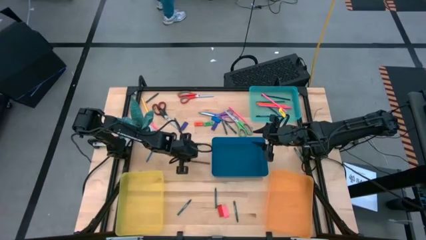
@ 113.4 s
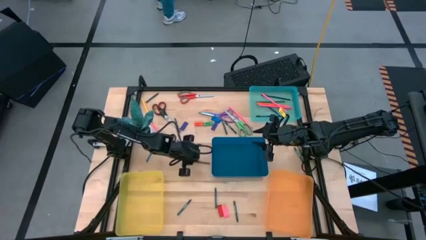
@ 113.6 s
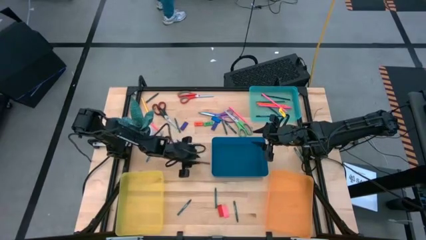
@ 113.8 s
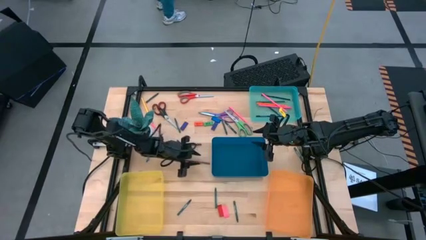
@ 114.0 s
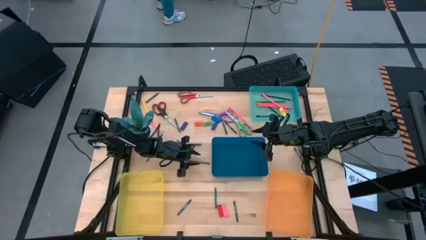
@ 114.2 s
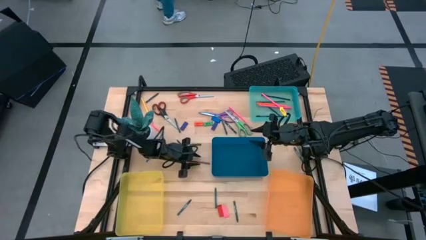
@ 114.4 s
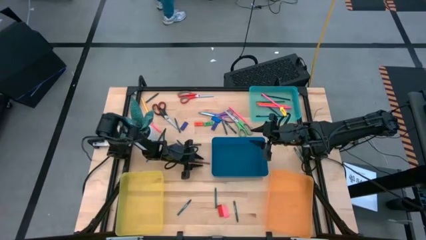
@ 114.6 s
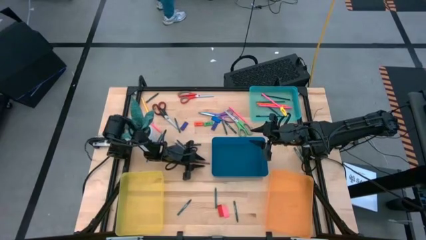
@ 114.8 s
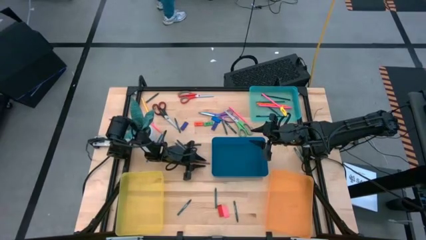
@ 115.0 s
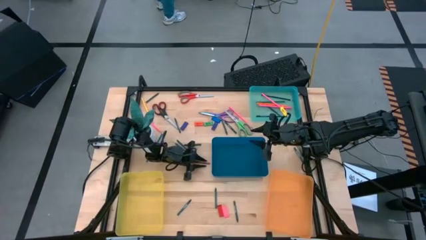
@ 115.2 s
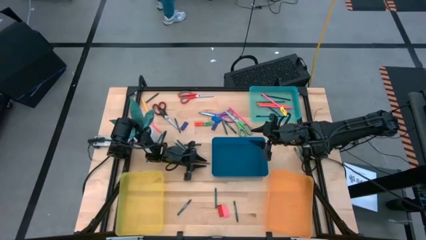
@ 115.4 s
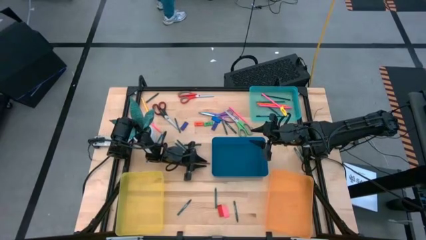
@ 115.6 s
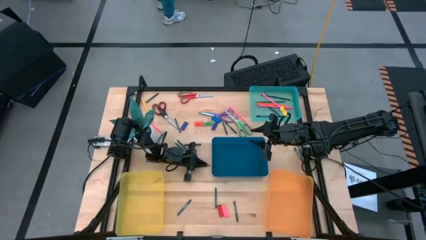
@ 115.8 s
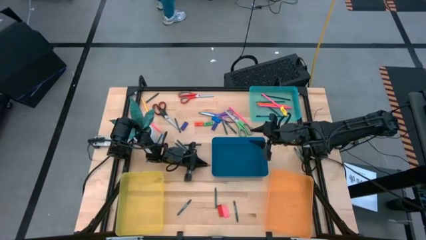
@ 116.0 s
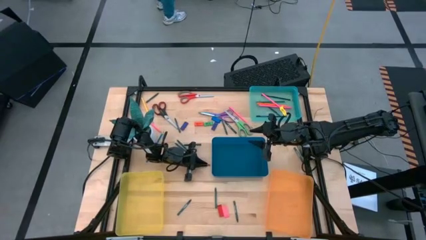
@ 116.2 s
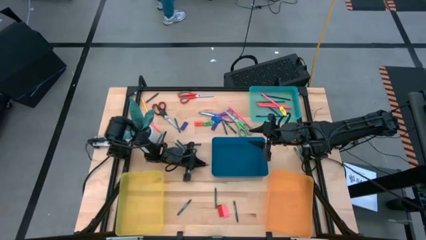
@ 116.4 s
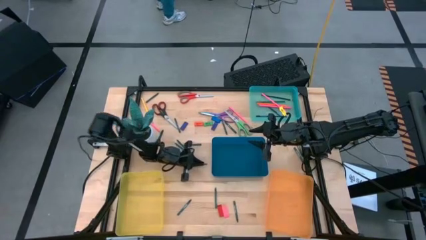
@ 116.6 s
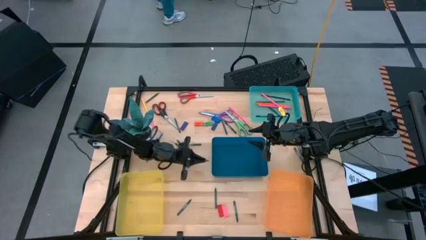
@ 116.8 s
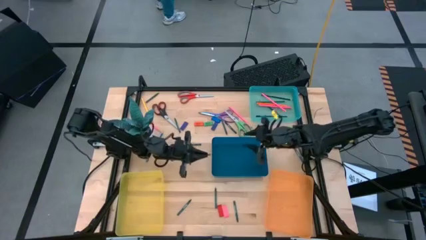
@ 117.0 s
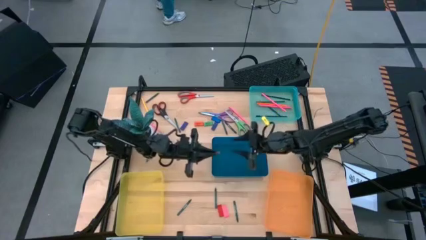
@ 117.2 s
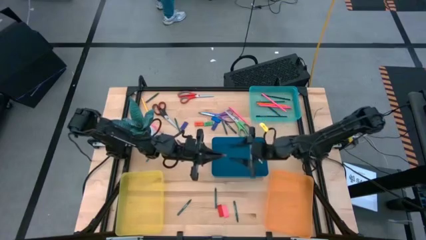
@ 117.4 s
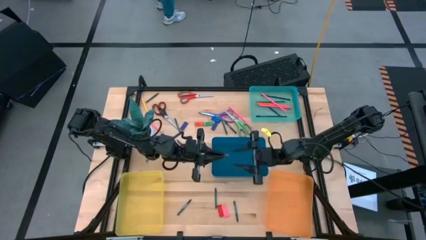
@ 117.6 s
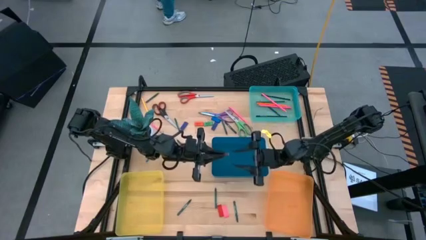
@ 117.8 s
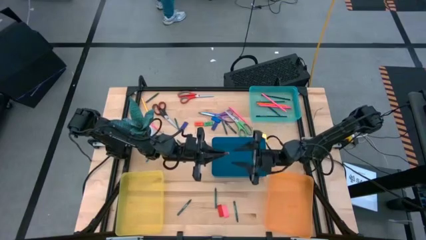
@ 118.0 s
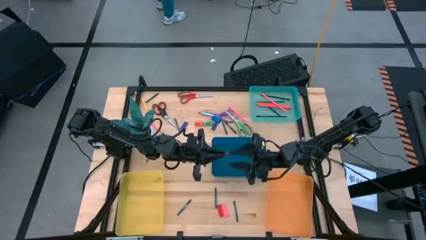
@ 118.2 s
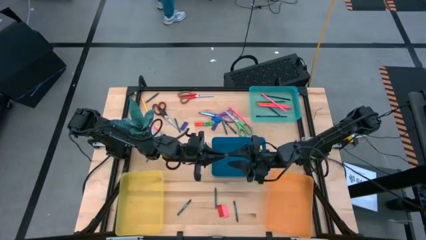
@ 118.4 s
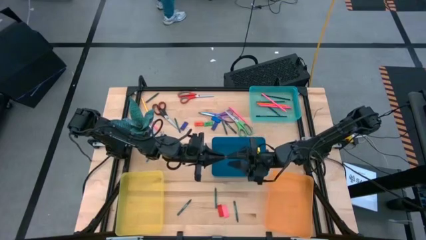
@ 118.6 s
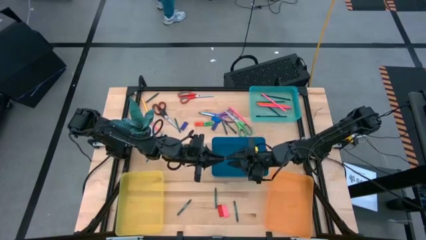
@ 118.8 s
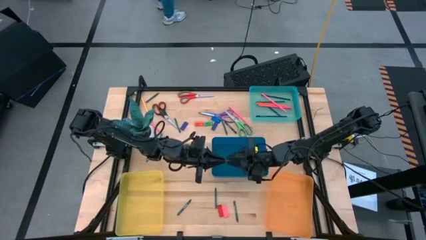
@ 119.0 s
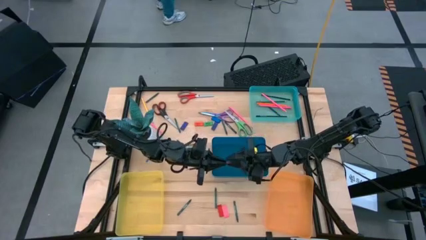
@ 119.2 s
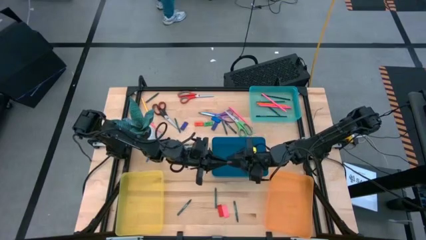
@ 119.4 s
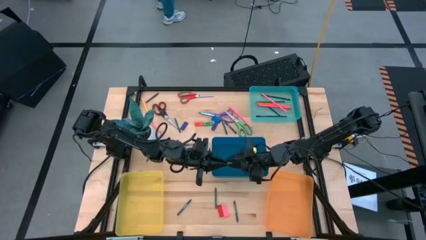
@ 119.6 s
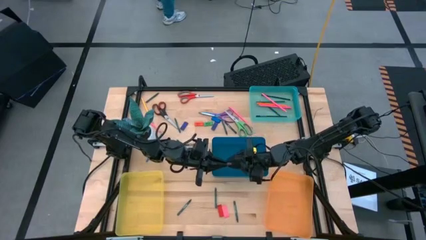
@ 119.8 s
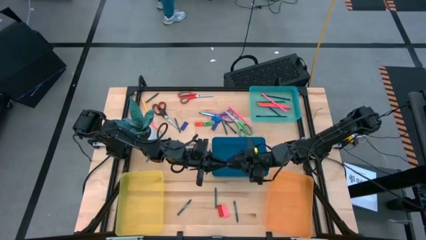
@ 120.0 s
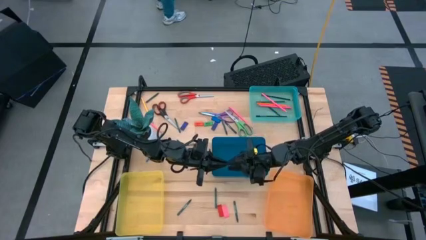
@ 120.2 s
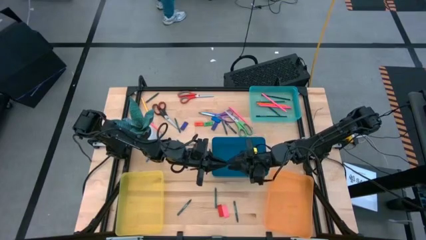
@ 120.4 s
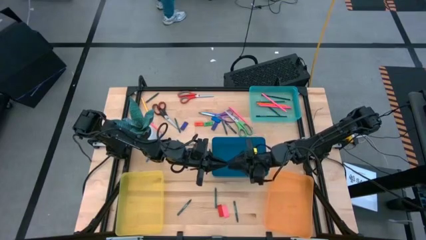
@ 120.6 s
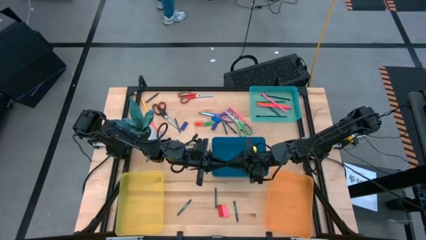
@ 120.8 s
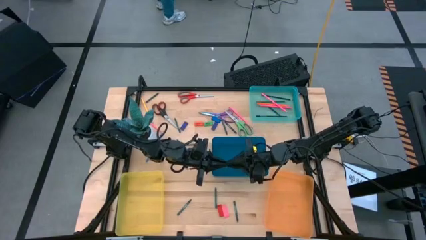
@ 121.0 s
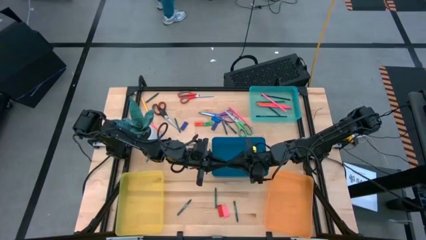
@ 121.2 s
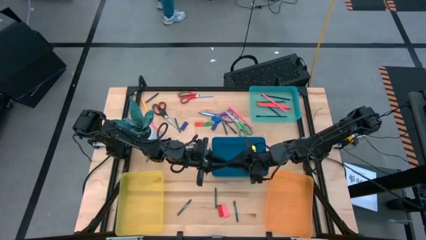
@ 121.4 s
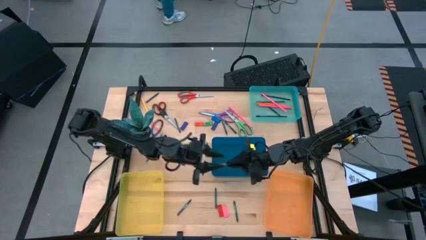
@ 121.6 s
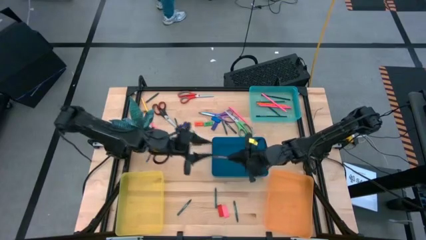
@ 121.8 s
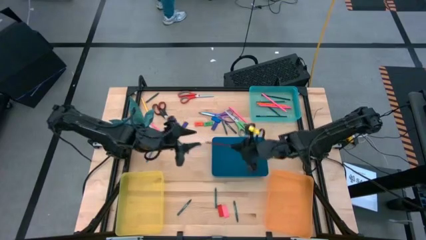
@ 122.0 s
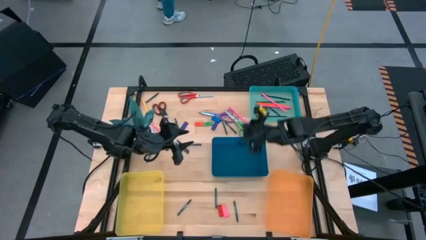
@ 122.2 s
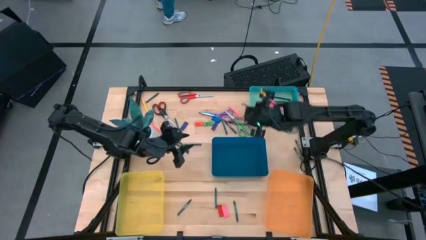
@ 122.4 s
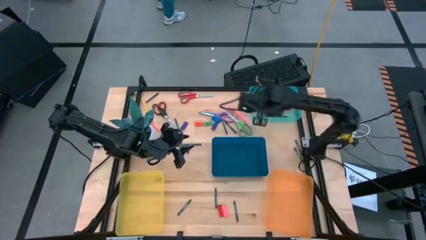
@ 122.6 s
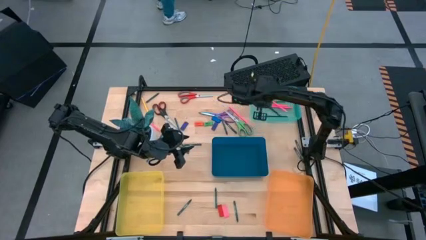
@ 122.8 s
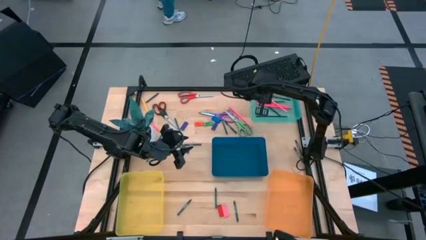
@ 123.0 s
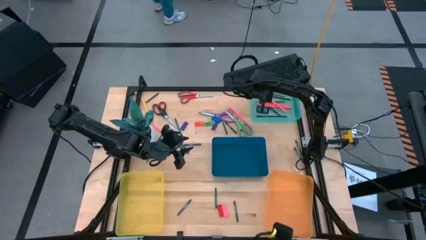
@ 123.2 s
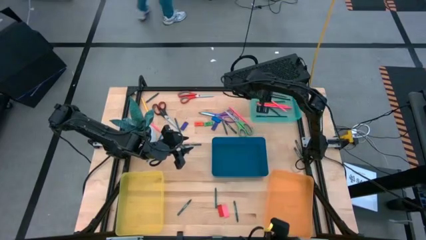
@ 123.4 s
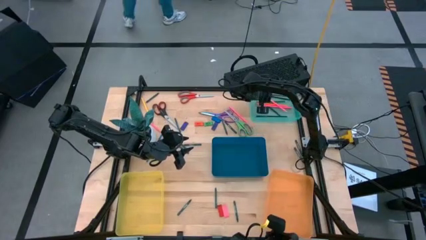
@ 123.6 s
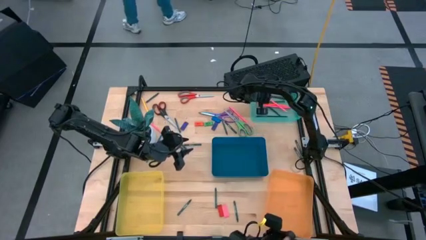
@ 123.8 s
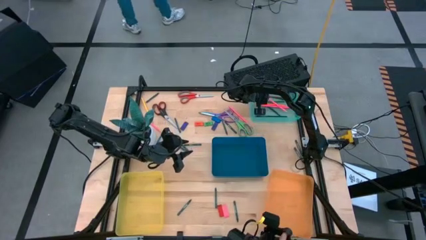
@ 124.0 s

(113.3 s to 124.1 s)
Task: Sort crayons/erasers/pens/pencils in bins
Put the brown pencil into the green bin

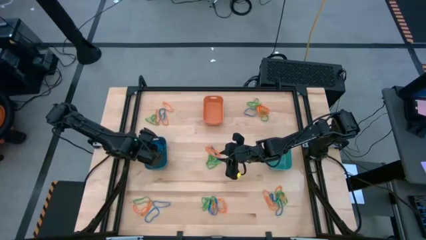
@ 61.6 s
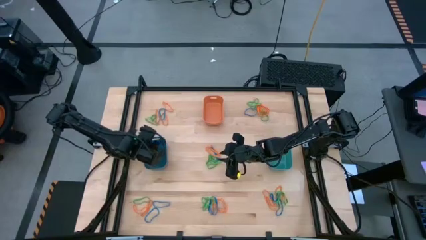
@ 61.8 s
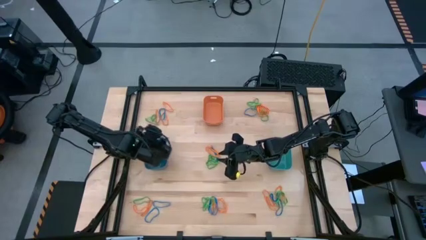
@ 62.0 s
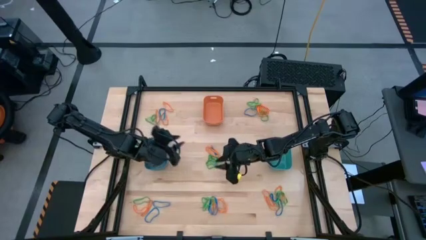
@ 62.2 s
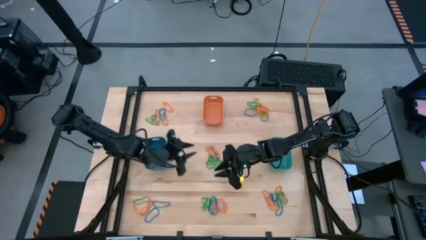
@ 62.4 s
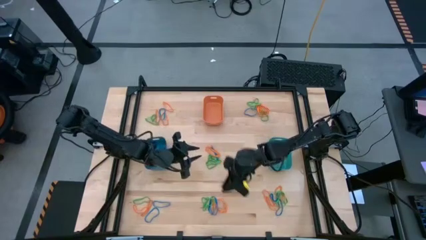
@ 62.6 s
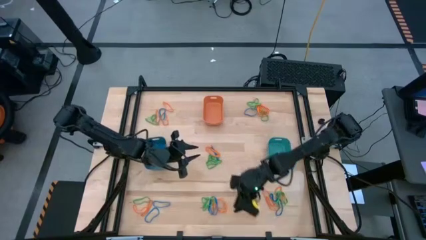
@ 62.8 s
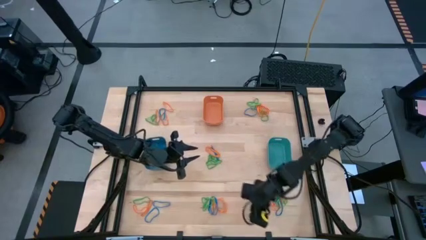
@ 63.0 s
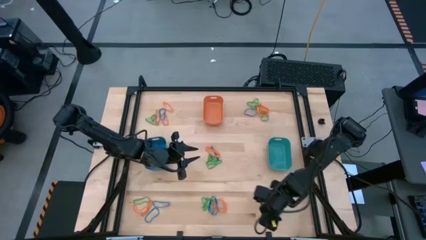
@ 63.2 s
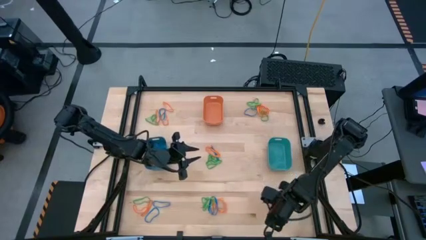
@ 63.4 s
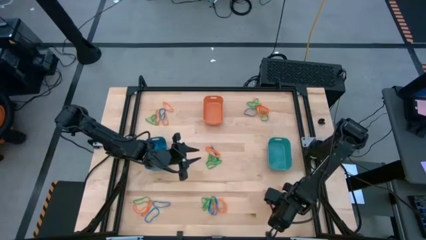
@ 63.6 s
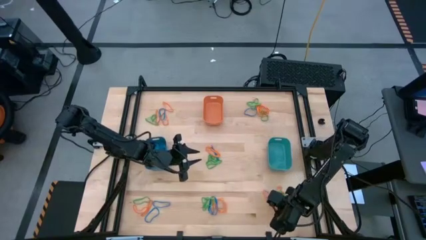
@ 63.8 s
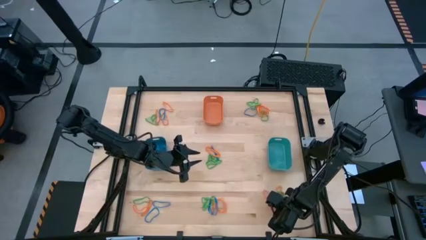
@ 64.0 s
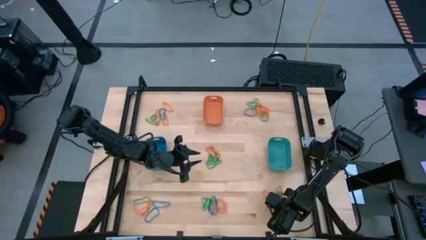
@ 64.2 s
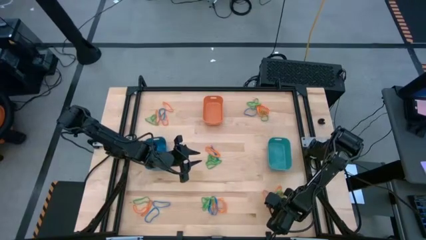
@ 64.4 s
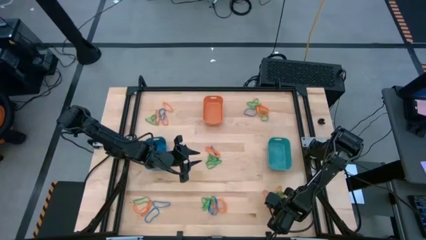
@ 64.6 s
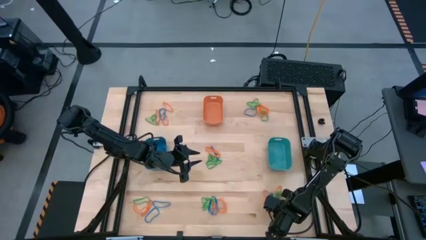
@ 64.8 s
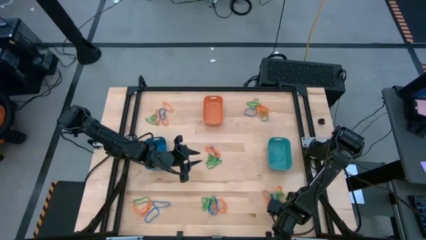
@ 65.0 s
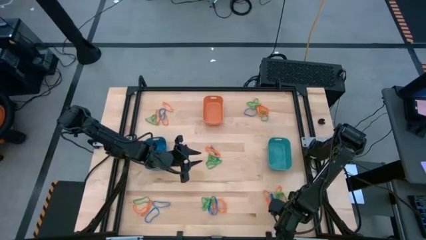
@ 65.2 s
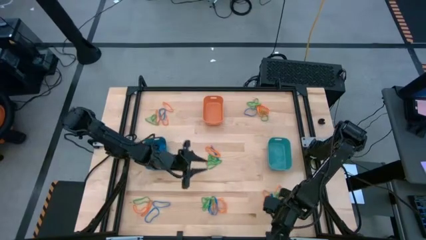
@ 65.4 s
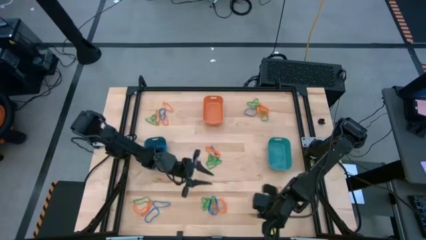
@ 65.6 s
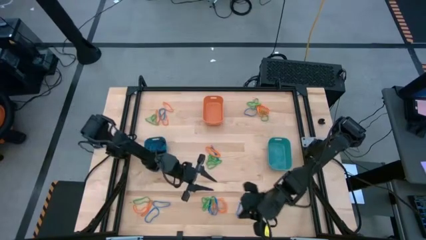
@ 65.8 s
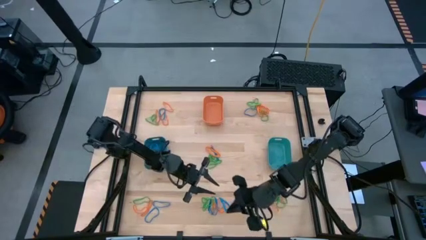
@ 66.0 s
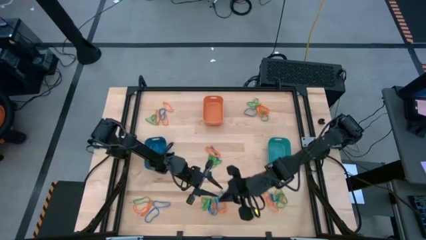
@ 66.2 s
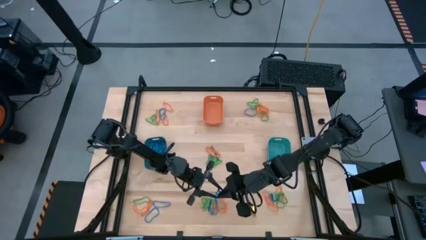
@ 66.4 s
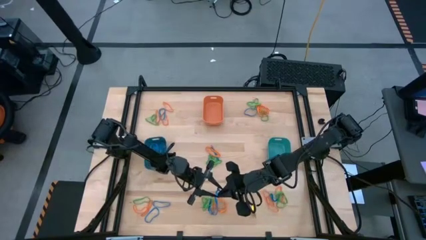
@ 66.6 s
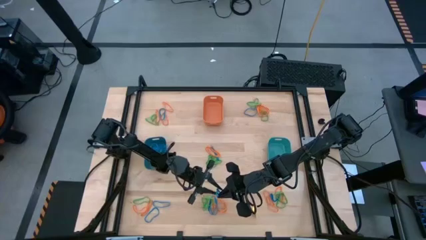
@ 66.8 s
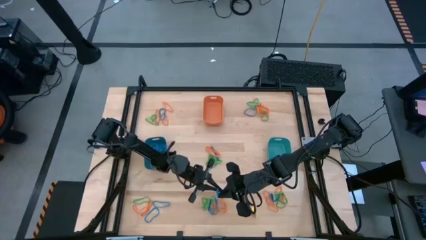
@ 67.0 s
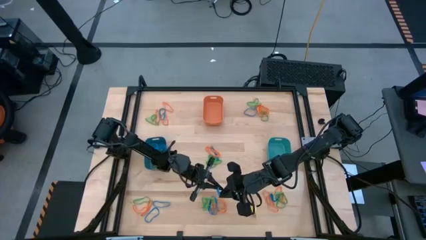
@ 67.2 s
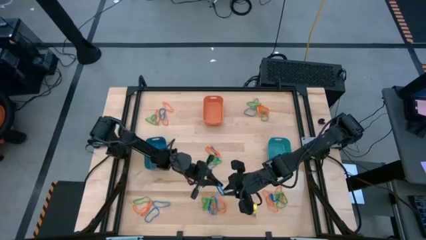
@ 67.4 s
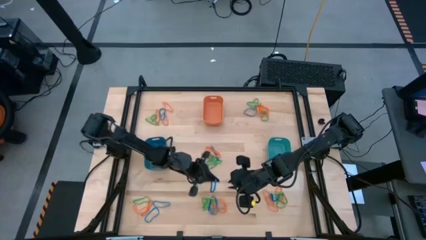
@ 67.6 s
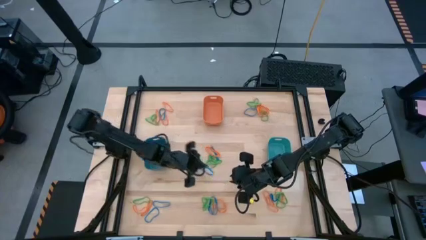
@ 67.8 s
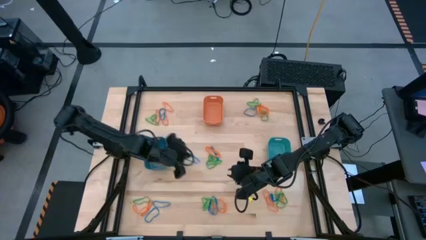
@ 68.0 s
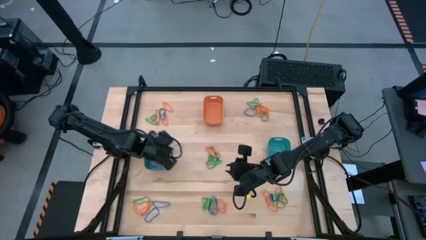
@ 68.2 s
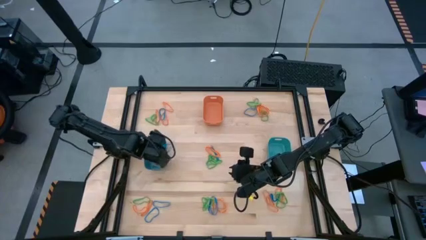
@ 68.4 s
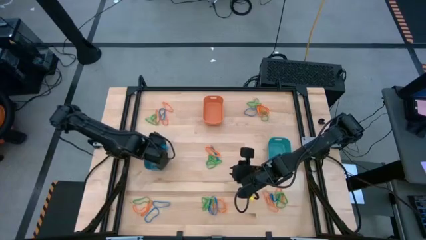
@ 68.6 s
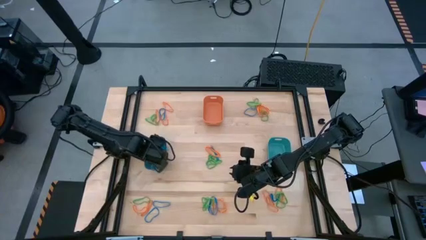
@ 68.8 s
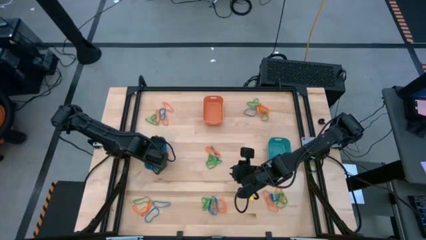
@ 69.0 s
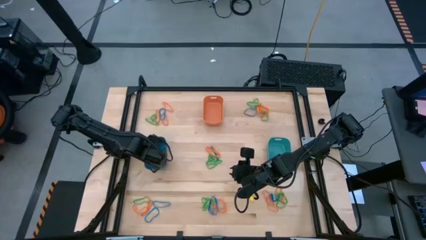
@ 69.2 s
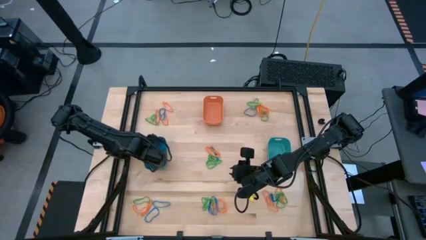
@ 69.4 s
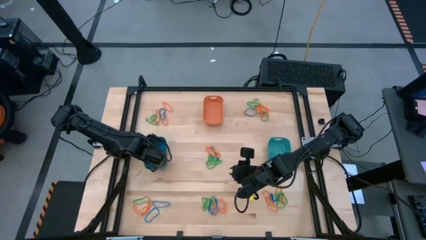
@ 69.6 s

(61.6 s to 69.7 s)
Task: Sort rubber bands into baskets
Put the blue rubber band into the blue bin
